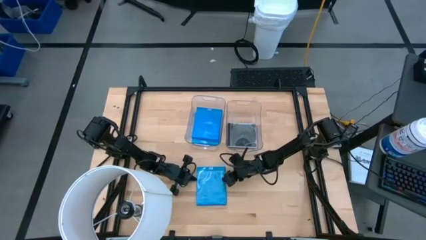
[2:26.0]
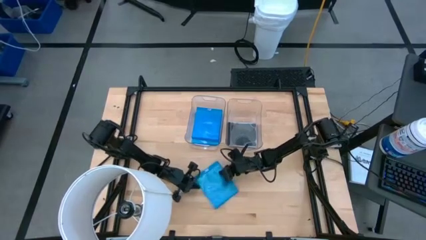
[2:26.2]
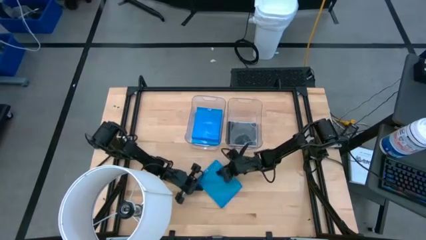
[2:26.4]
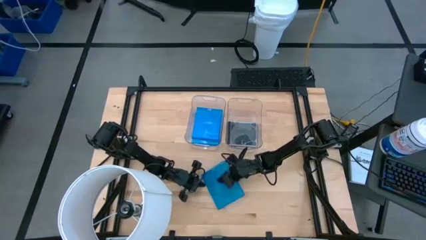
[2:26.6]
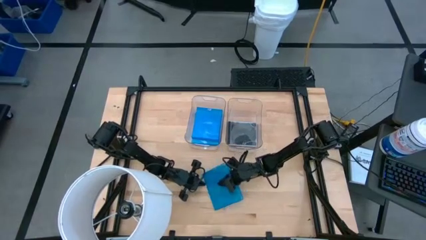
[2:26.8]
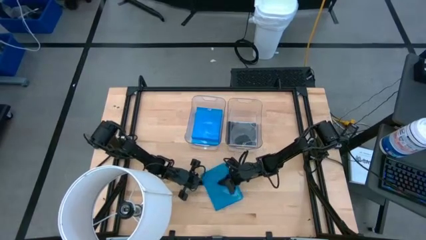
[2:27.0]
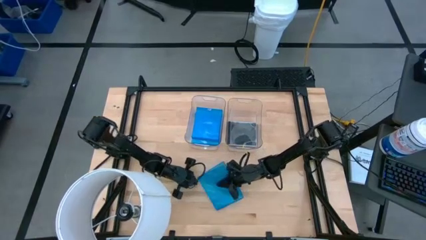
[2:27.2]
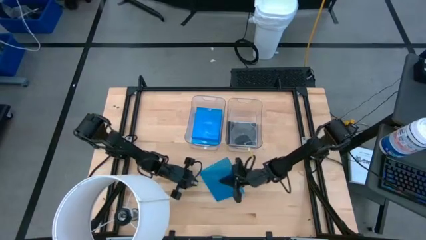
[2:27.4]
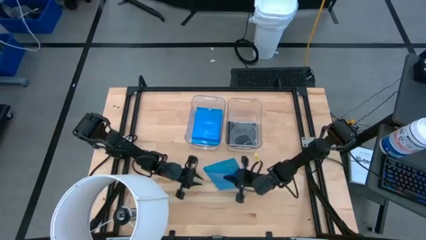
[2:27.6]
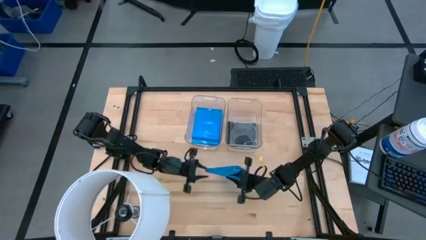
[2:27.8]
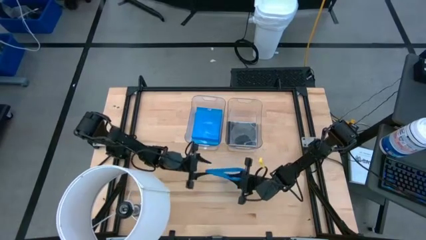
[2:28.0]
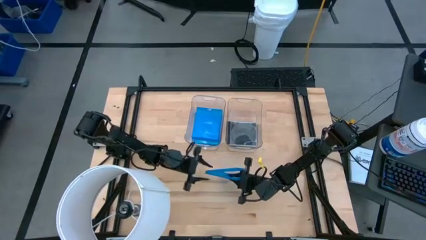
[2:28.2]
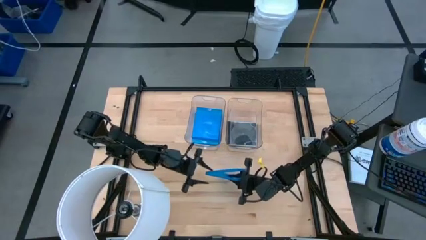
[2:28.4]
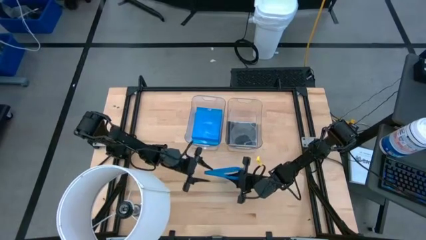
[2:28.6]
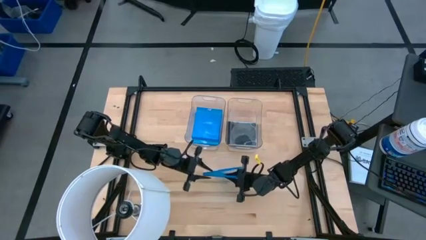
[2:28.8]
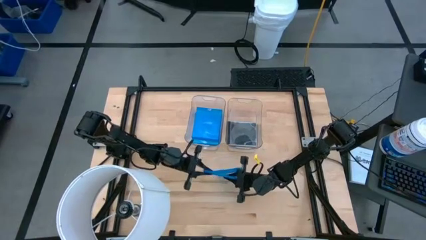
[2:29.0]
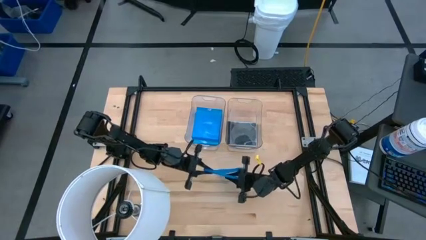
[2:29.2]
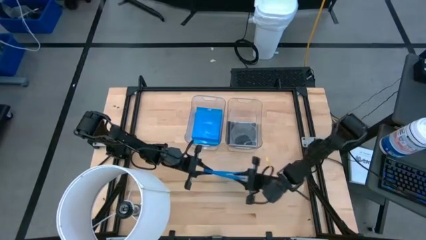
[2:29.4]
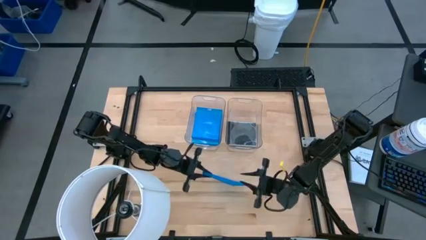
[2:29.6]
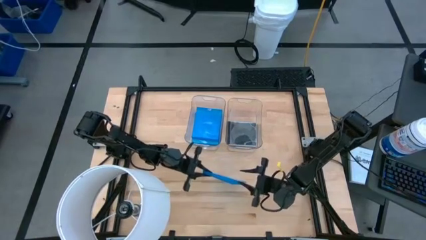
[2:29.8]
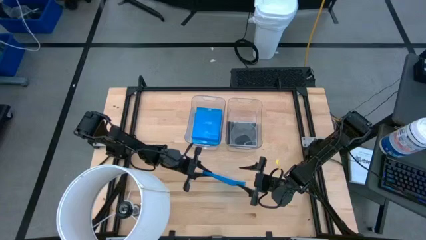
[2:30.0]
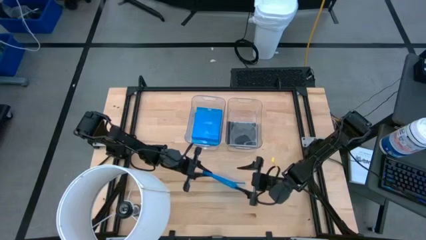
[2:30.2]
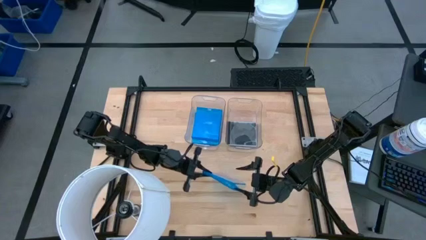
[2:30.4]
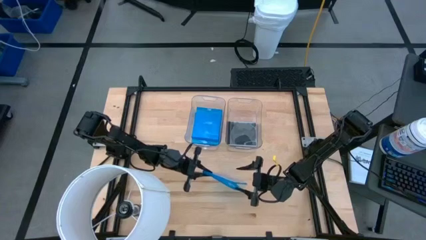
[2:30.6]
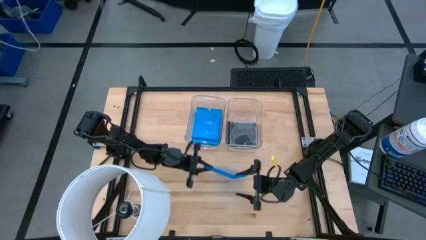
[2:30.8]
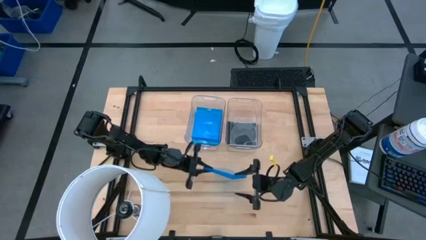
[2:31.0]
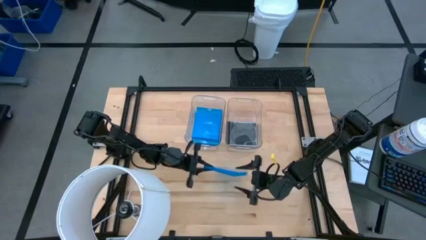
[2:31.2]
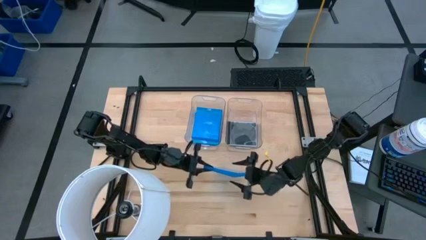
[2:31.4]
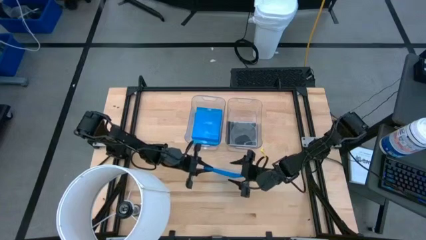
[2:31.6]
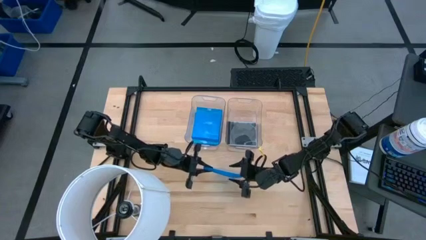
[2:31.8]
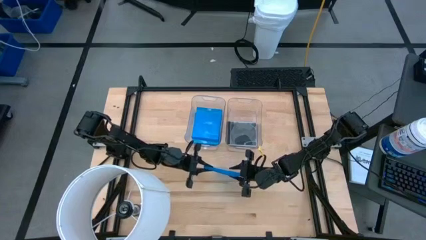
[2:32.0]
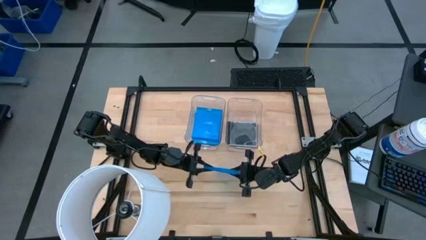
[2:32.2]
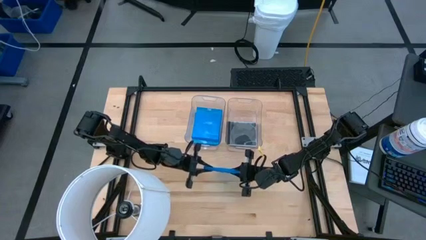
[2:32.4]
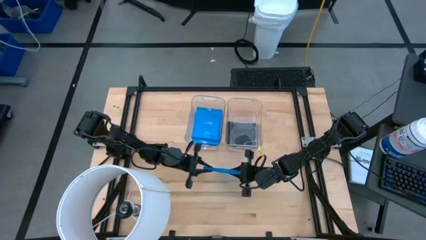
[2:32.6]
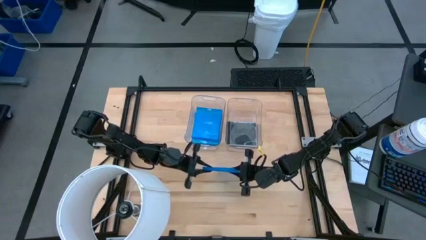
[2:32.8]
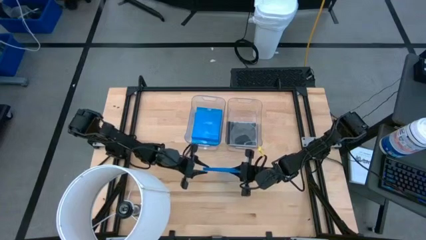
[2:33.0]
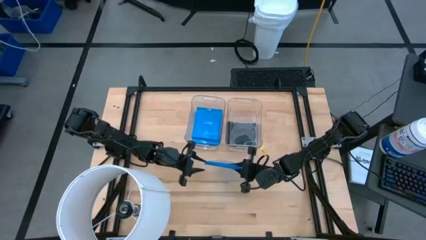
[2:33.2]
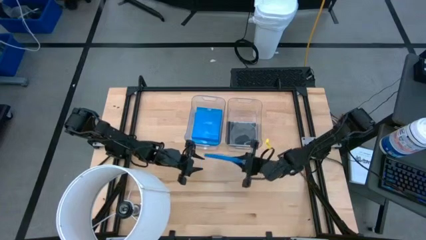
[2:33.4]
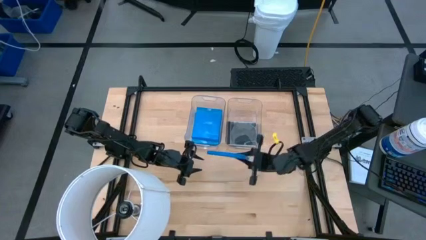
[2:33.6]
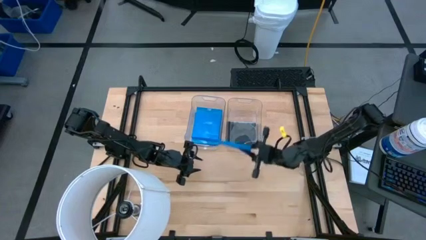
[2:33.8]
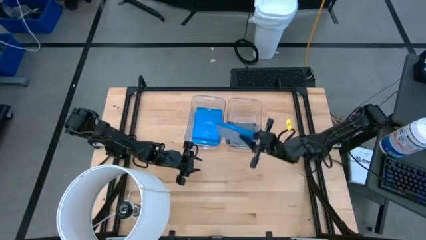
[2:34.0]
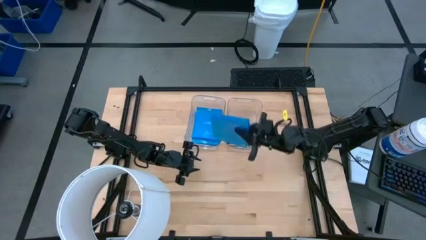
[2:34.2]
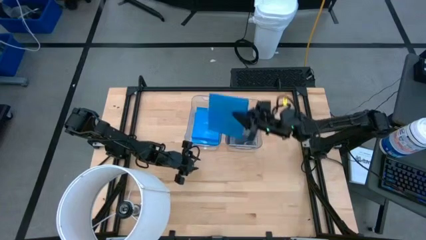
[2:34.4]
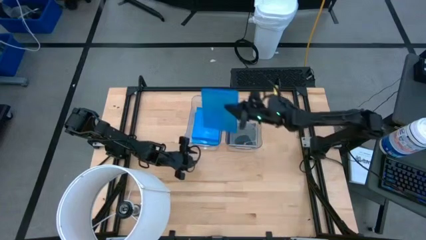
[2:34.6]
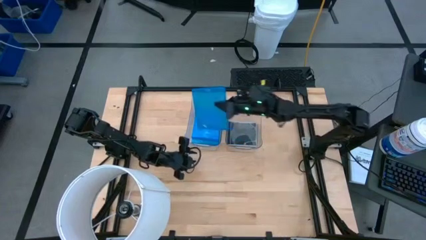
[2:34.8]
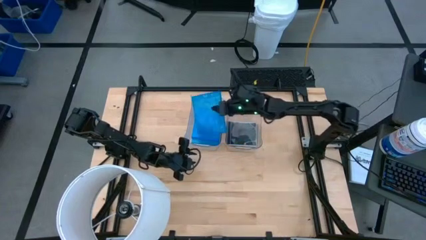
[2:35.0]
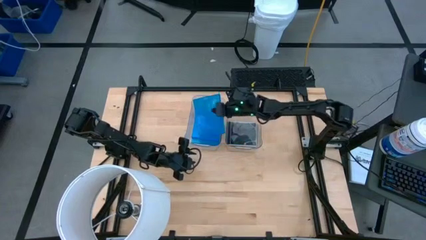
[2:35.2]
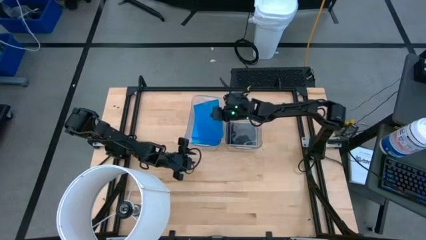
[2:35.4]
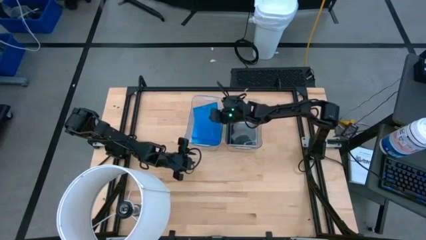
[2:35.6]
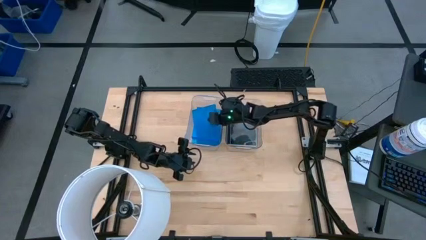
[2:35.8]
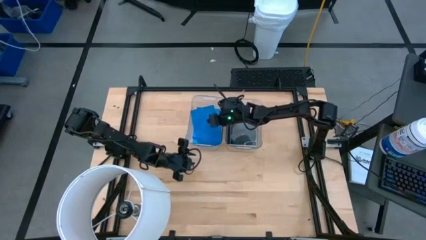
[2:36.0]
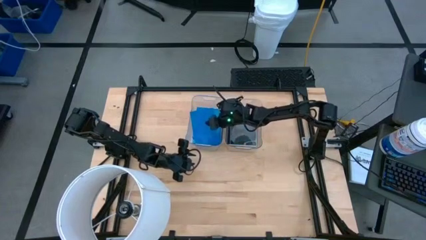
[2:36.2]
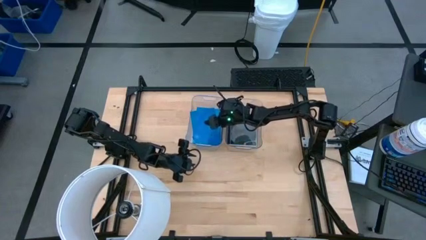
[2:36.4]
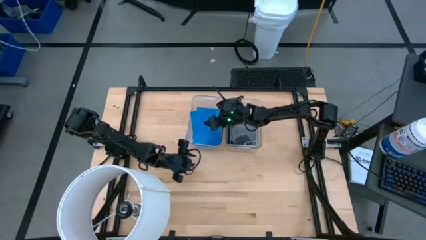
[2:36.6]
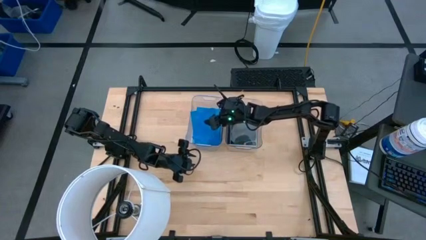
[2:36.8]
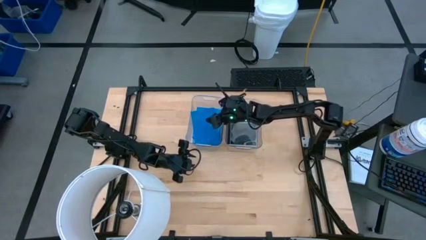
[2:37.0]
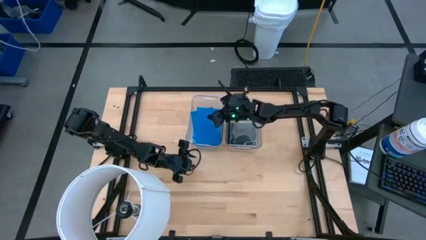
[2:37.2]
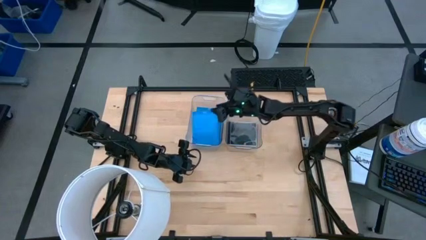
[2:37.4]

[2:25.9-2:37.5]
Task: Pick & place jewel cases by type
Put the blue CD case into the left transparent bin

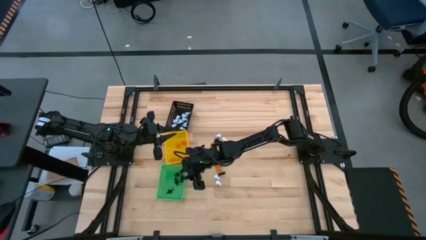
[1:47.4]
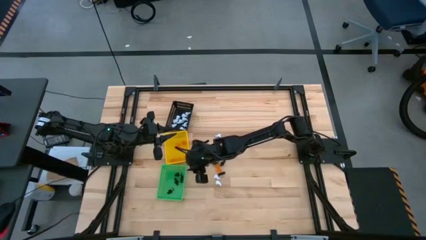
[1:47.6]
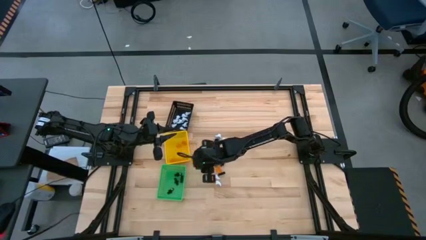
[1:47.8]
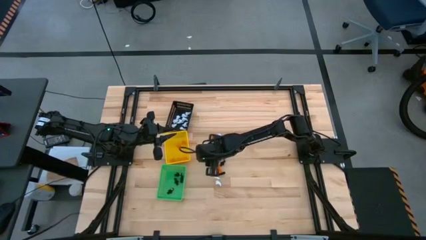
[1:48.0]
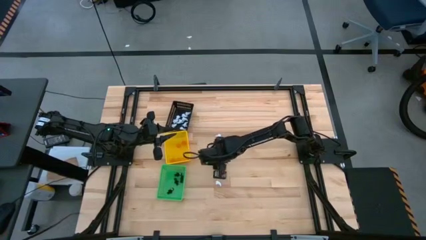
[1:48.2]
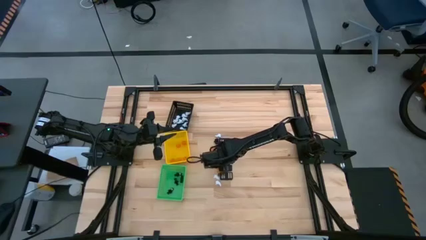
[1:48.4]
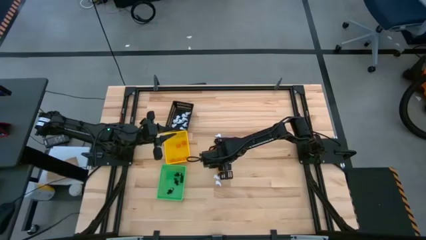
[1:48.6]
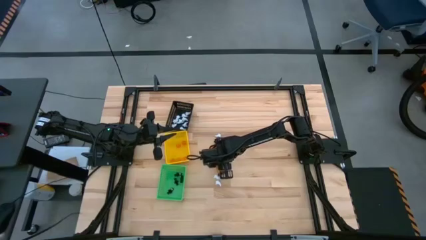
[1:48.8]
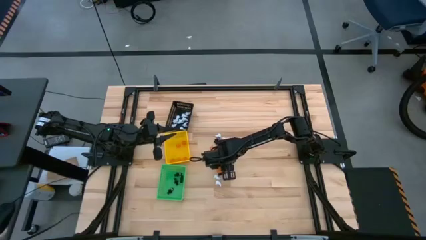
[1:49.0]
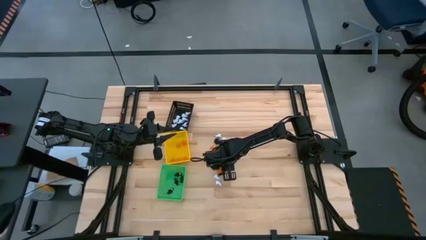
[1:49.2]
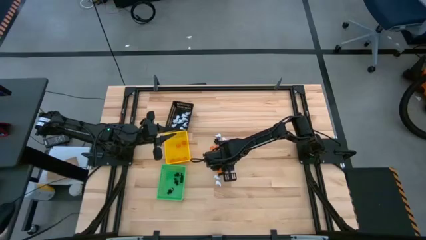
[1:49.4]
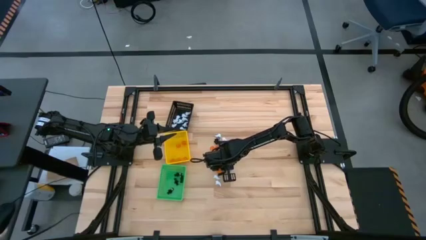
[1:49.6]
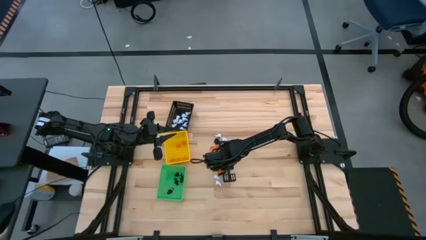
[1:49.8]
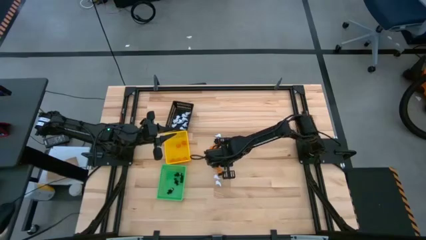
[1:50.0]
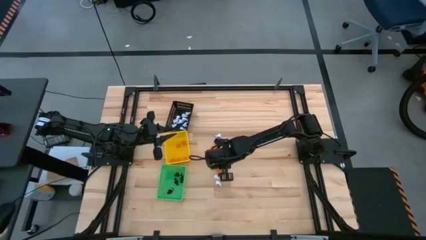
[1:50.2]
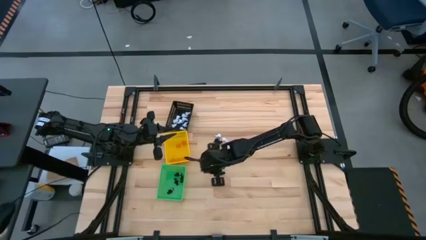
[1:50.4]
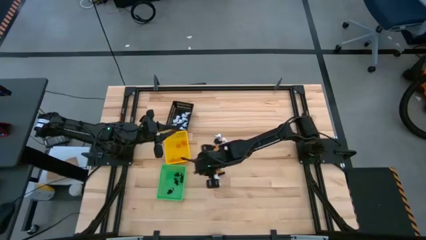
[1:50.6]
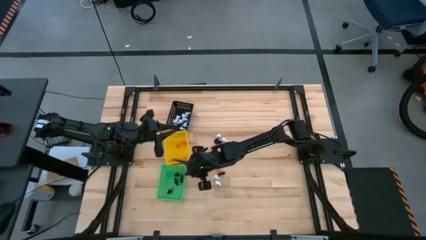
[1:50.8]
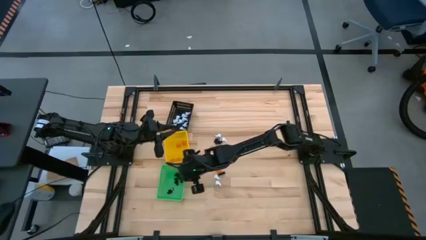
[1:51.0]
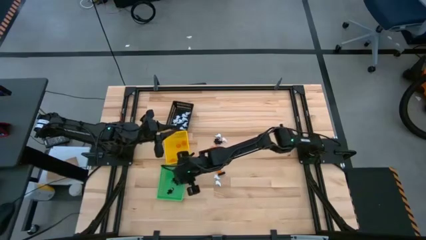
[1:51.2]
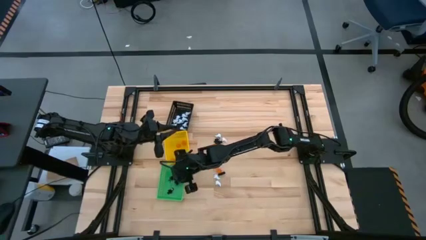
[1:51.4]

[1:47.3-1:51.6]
Task: Sort Halloween decoration
Put the black skeleton toy into the green basket

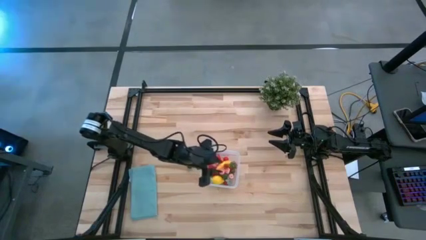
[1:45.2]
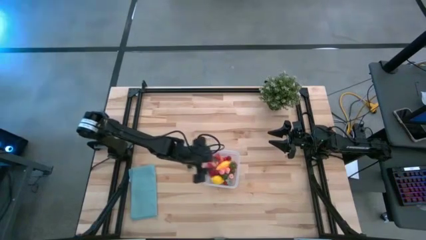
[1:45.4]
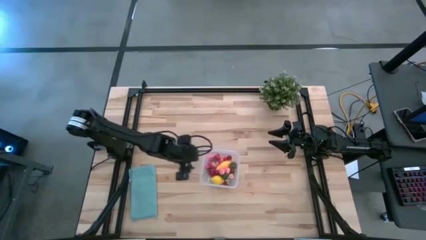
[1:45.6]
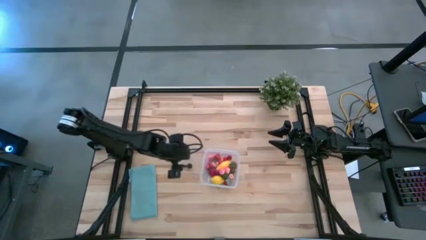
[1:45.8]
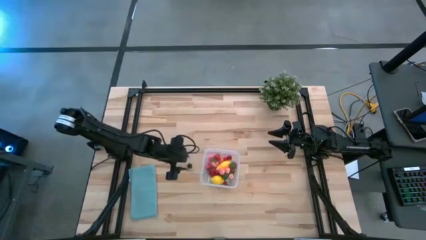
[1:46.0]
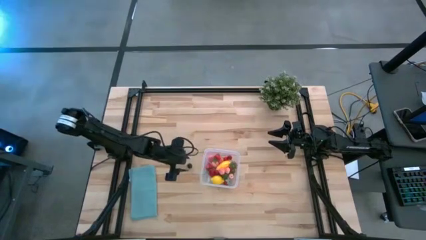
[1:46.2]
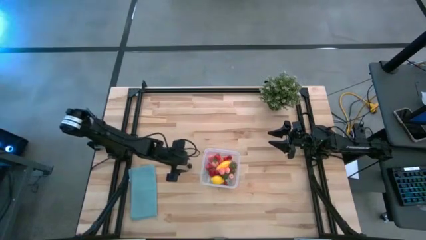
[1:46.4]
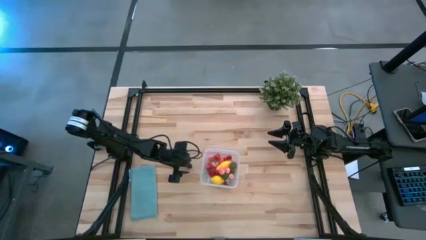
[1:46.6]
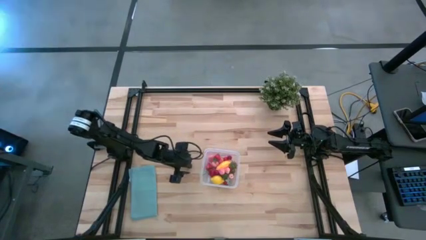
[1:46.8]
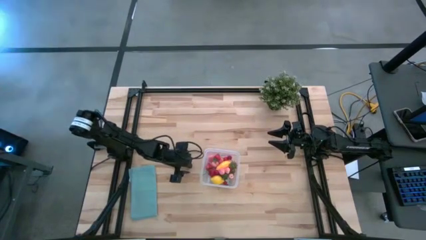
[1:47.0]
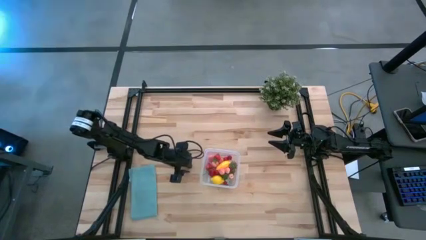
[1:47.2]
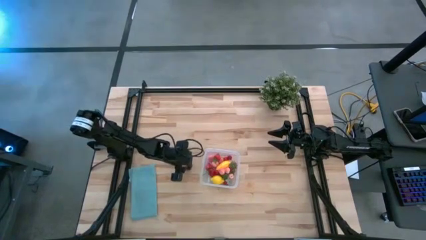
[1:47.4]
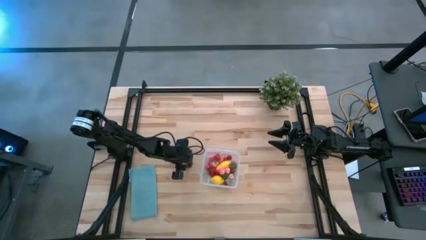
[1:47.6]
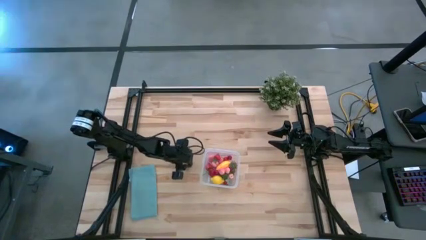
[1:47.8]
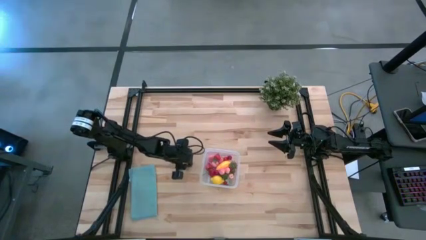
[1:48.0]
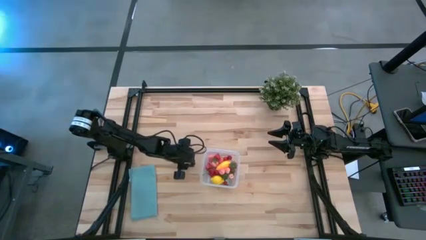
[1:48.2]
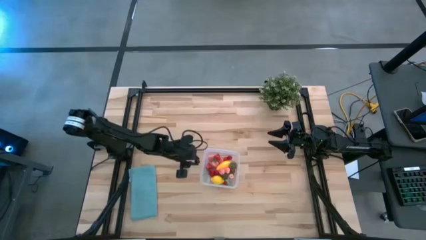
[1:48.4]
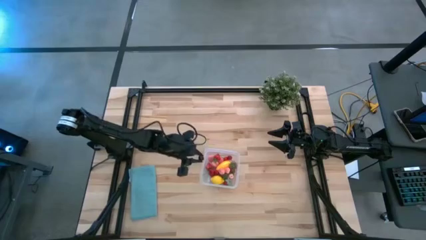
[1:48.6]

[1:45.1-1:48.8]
Task: Pick and placing Produce into tupperware
Put the black cherry into the transparent container
